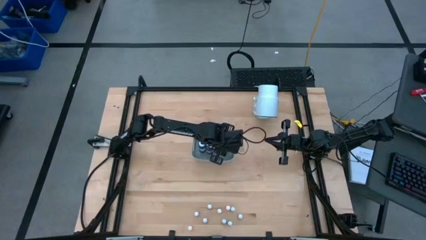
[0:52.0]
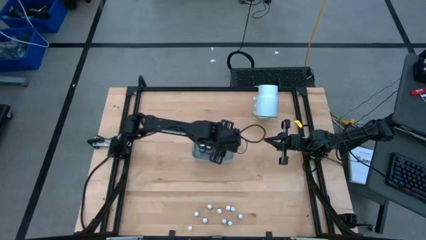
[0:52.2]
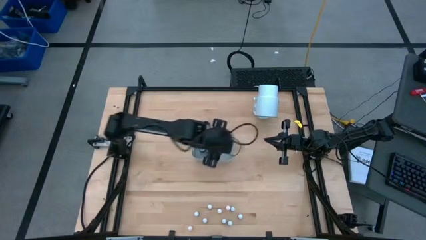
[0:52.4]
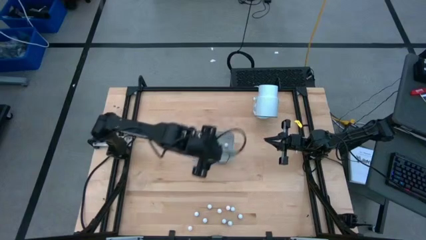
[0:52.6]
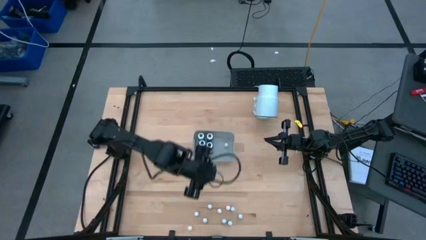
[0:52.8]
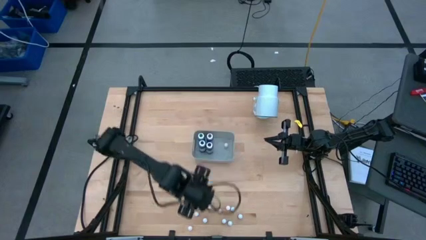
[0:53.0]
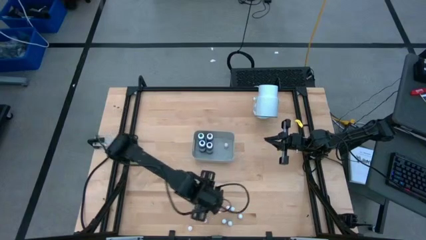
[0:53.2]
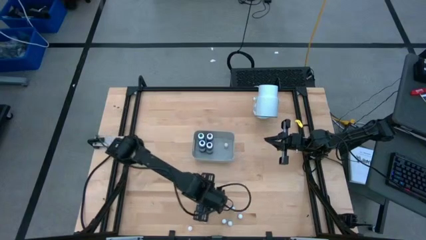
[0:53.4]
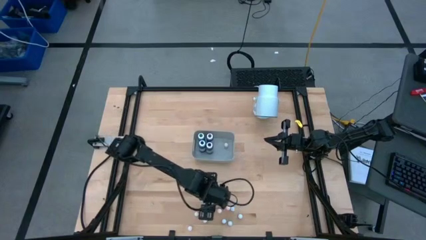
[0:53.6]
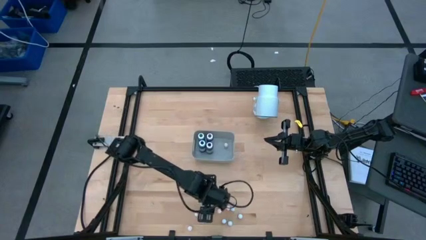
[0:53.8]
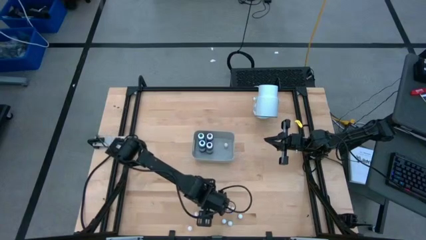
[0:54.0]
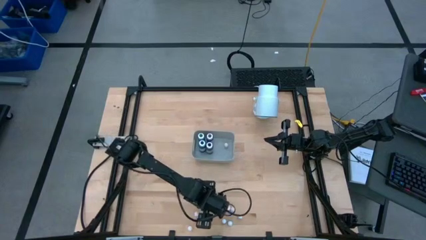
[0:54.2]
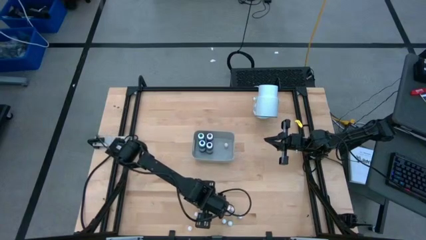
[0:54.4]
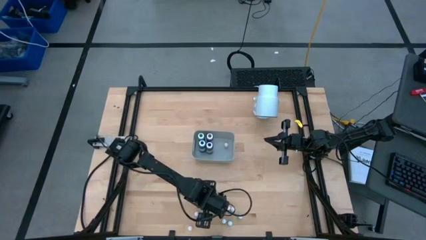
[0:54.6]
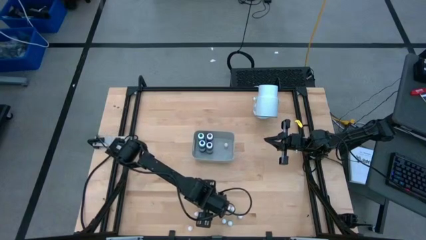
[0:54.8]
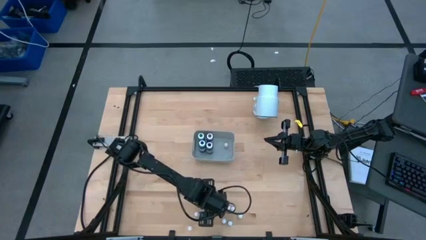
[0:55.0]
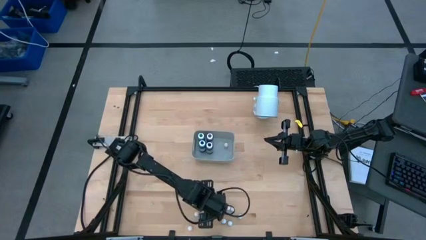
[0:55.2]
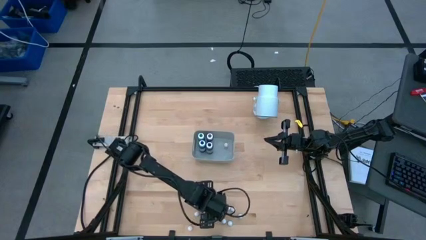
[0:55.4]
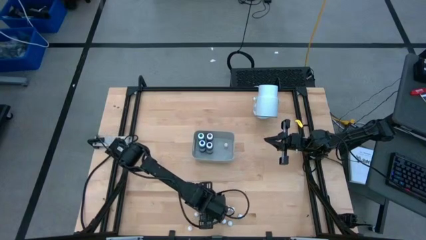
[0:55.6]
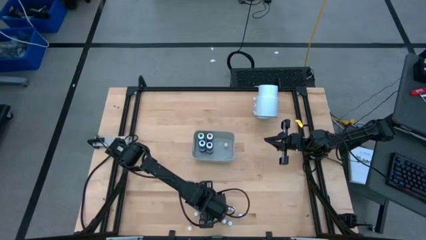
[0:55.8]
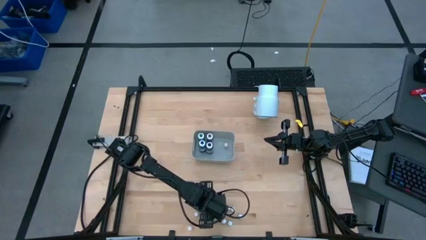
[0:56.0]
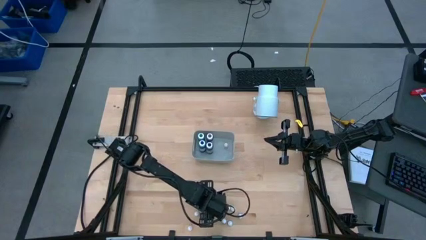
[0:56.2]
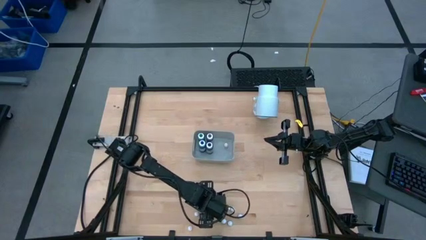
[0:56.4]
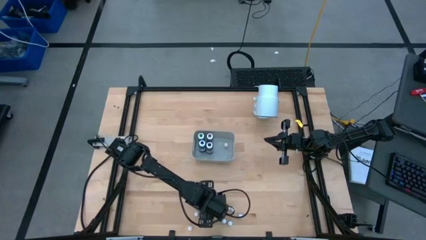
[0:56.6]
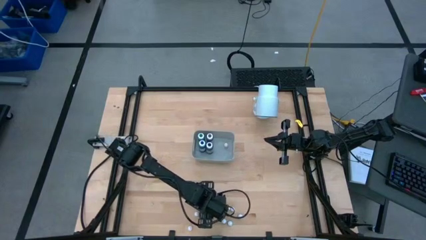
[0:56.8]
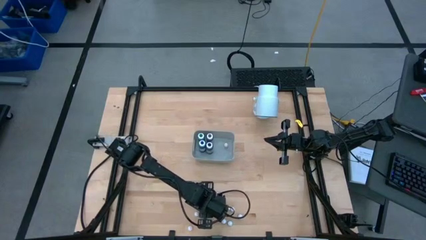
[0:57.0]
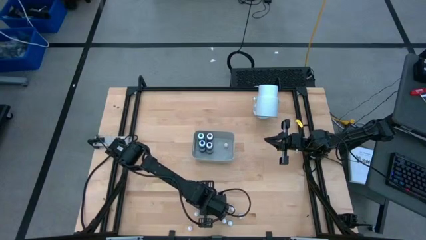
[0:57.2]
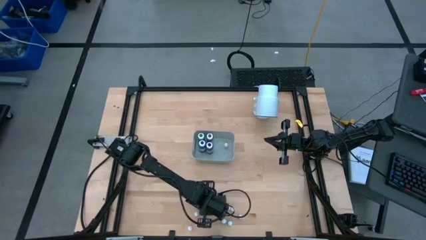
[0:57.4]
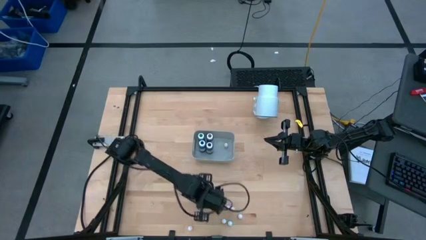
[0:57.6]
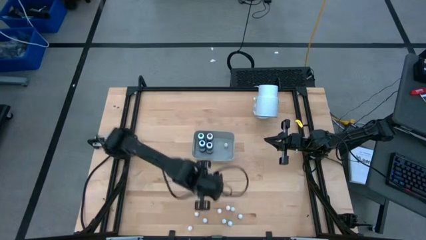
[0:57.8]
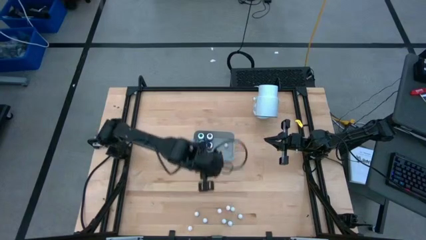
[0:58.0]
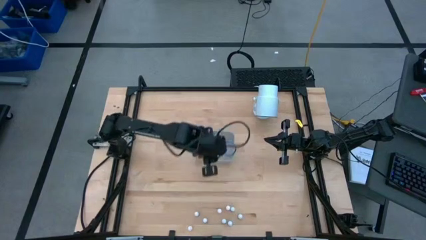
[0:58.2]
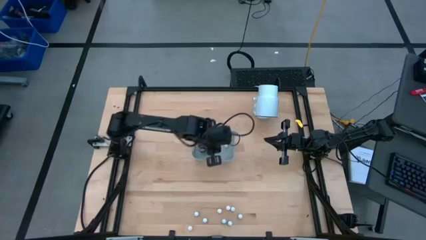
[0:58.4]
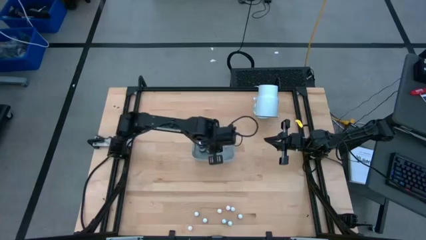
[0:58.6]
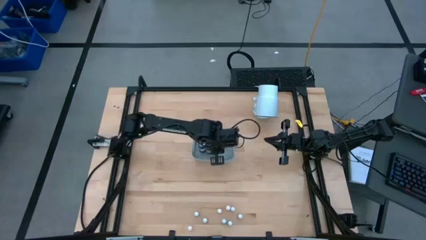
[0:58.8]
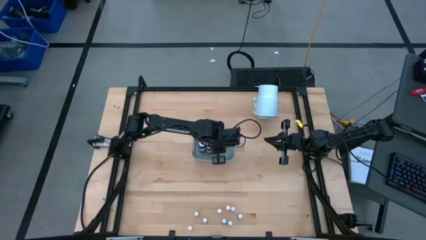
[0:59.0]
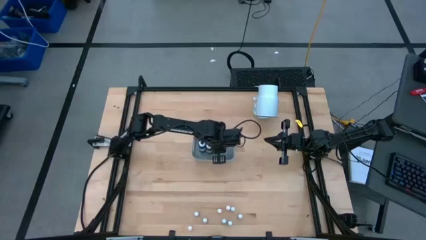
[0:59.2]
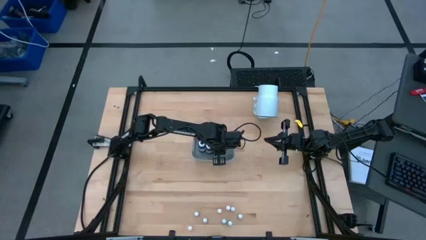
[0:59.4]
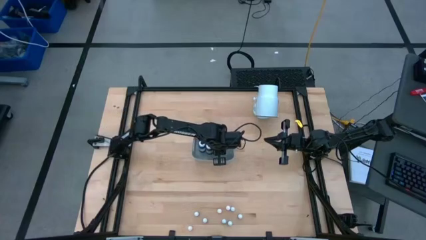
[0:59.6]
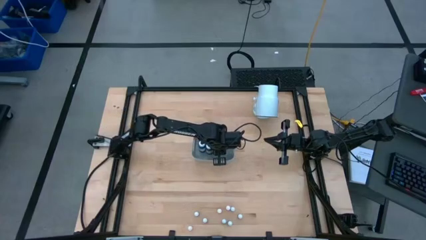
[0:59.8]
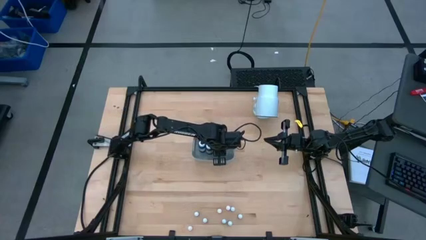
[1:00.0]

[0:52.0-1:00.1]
Task: Pick & Place food coloring
Put the small violet food coloring bottle into the gray bin

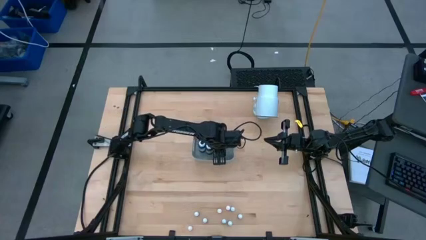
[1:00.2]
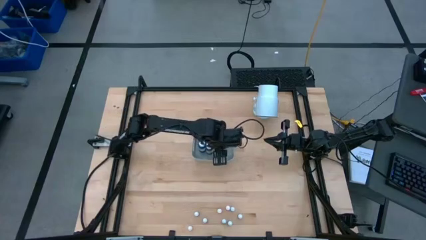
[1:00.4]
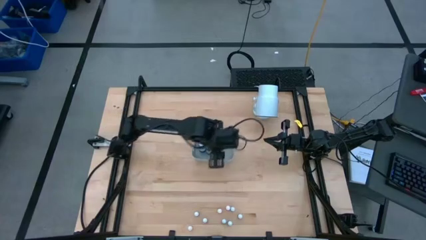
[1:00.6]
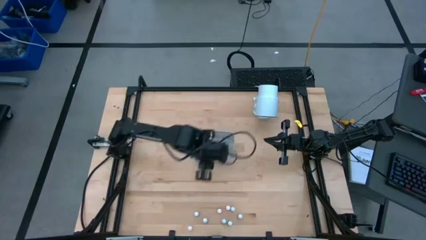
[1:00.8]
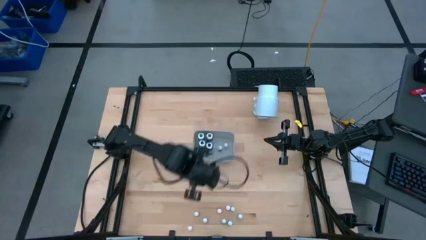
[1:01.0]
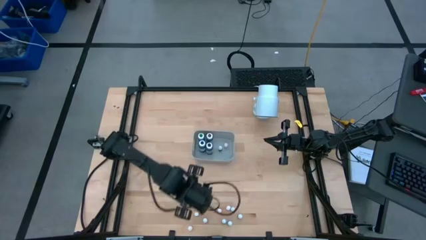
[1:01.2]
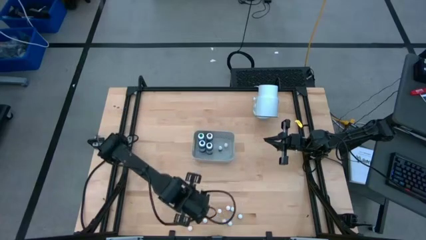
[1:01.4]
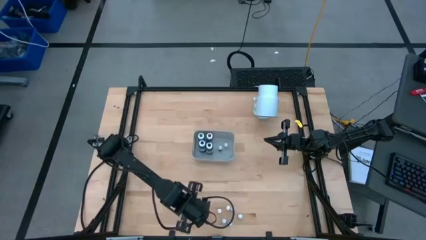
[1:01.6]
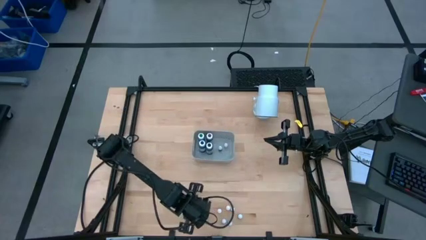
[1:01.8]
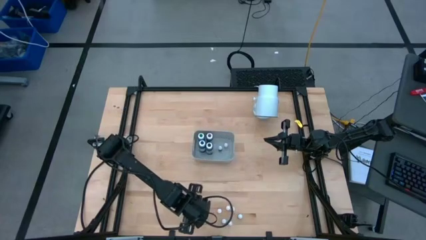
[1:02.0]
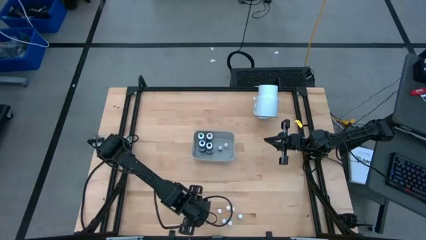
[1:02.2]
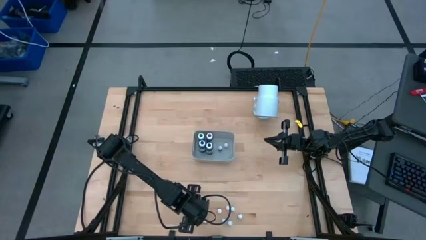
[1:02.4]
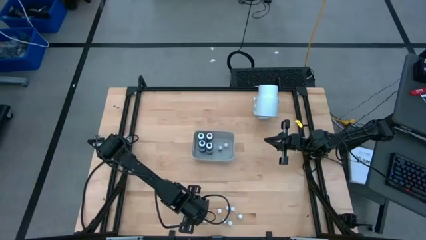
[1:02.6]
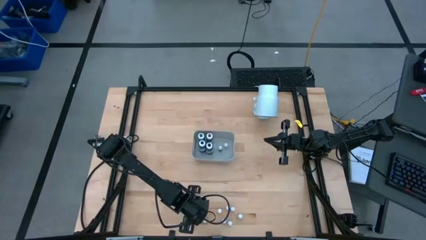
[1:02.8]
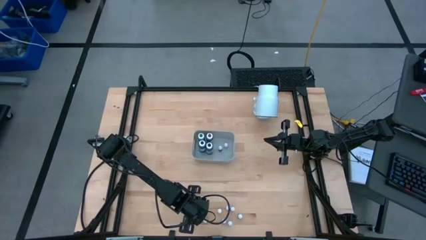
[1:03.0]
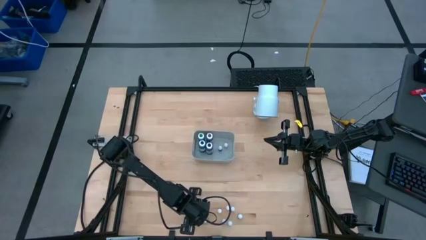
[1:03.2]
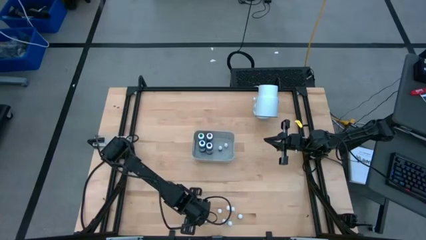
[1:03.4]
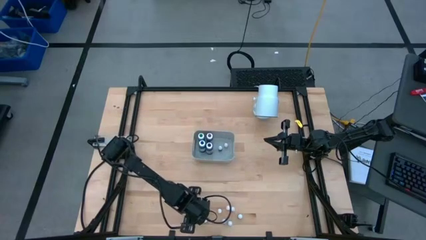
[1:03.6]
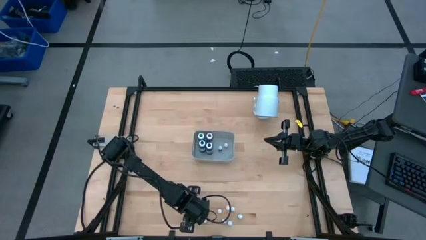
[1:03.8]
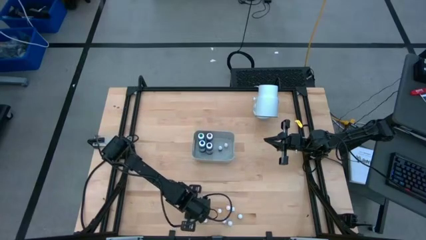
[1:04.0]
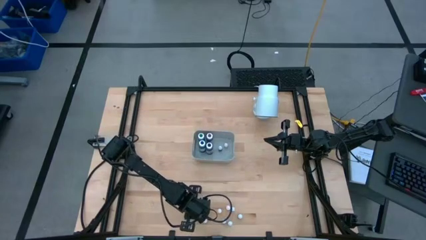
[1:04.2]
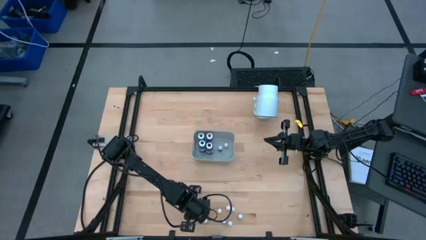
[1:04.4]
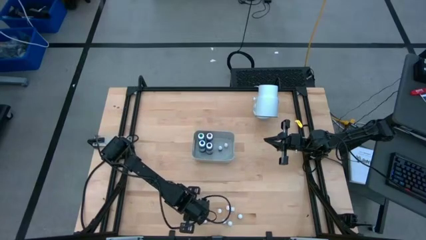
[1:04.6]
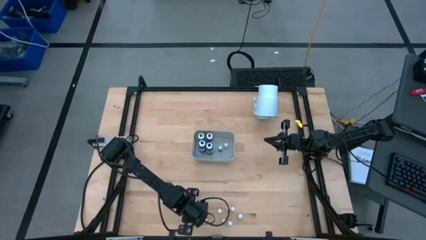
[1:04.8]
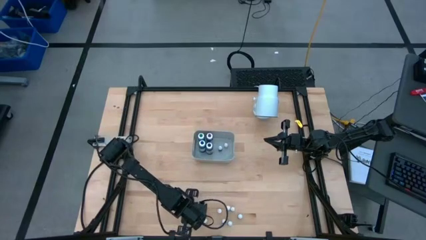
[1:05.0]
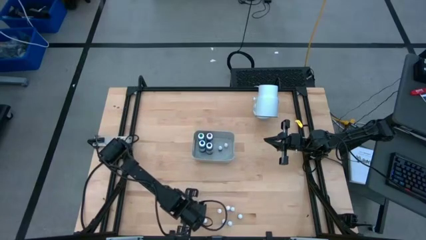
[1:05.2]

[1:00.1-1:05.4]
Put the small black food coloring bottle into the gray bin

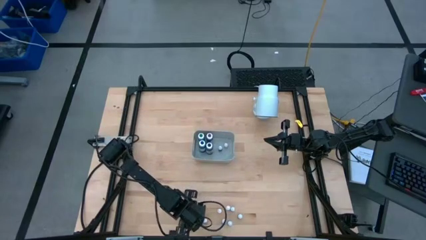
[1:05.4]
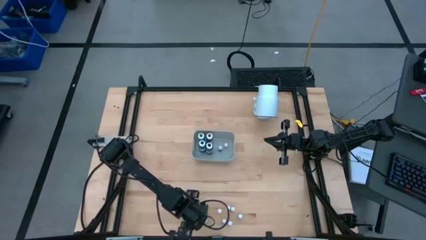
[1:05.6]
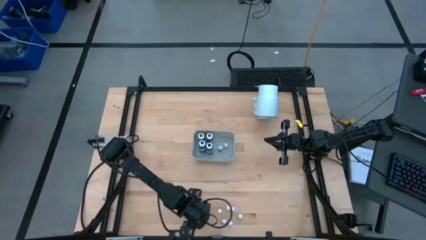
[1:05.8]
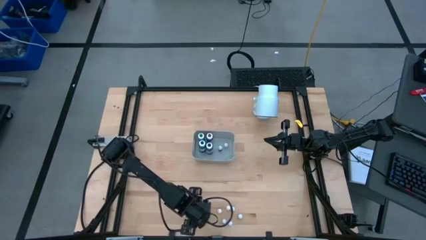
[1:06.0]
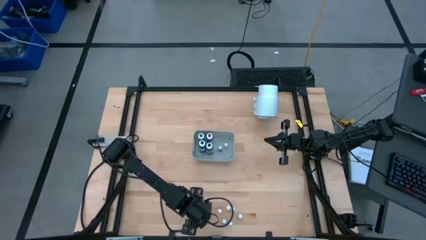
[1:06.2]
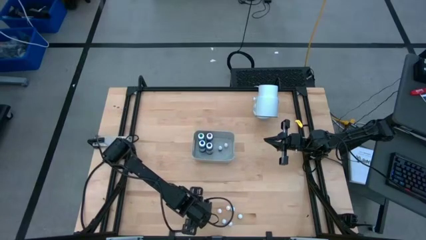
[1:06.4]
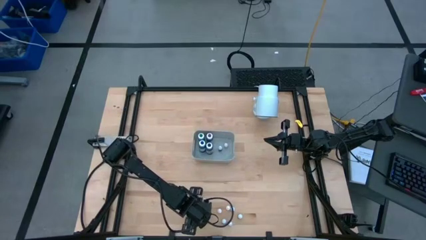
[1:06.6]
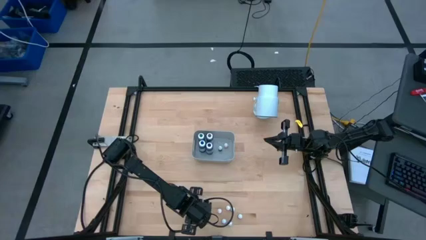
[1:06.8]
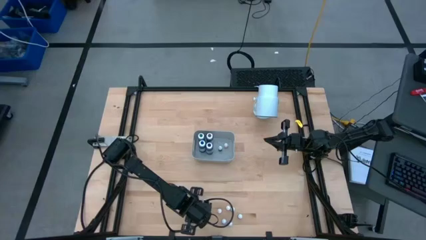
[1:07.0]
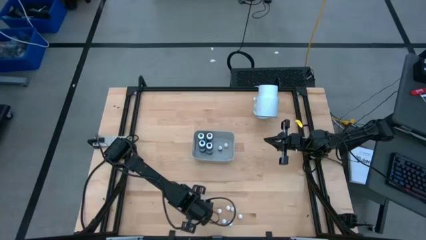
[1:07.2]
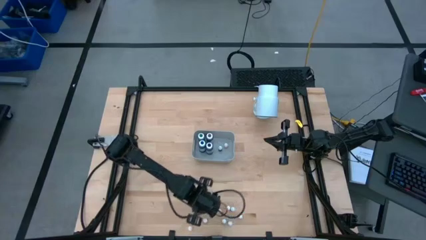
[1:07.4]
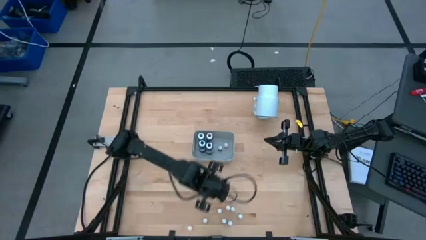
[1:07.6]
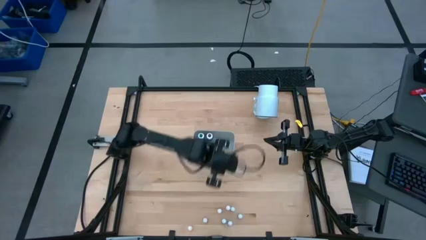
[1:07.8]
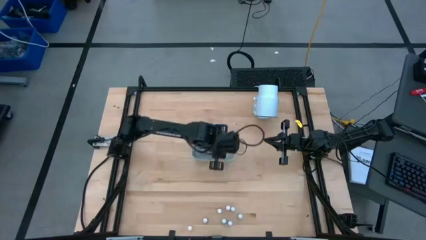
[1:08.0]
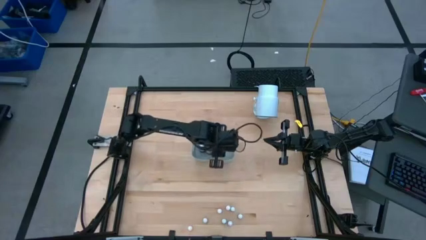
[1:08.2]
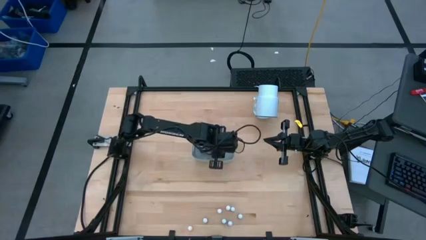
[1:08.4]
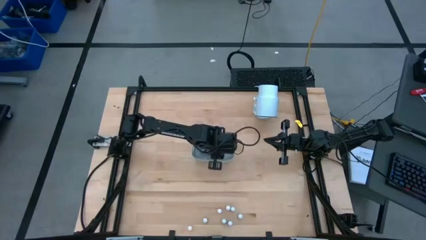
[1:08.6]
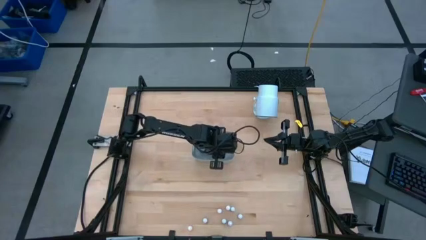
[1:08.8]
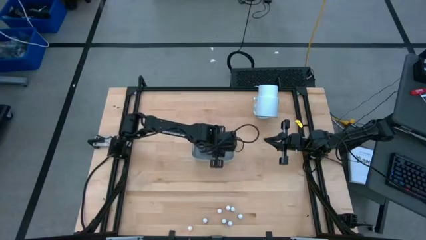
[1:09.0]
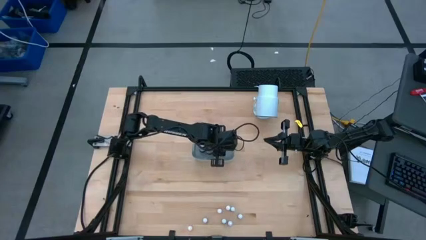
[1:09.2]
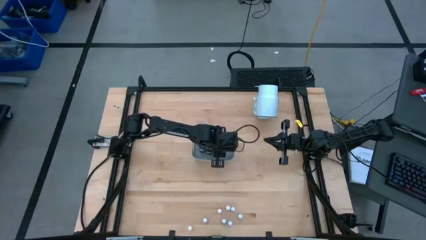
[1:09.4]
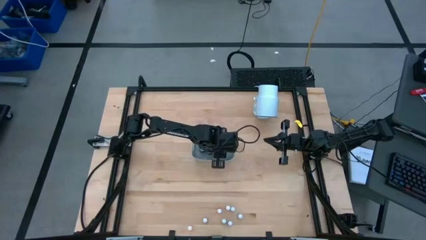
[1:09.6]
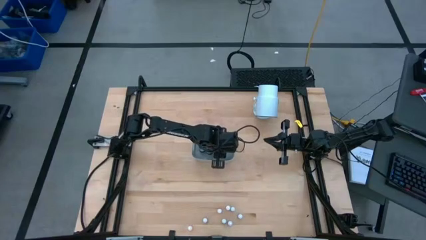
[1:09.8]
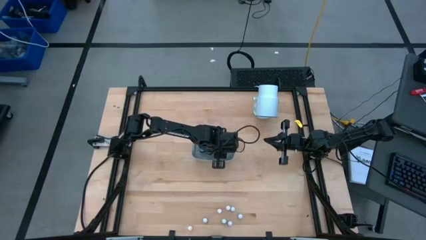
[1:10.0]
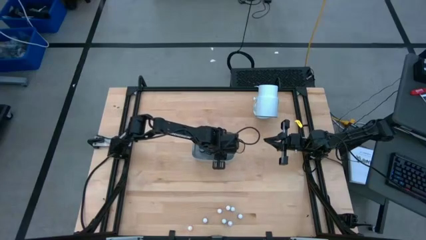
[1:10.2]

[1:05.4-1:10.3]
Put the small black food coloring bottle into the gray bin
